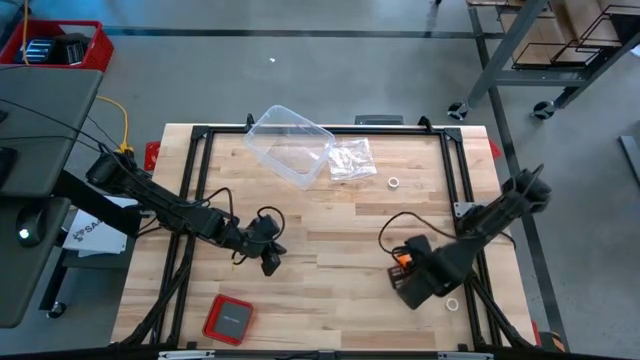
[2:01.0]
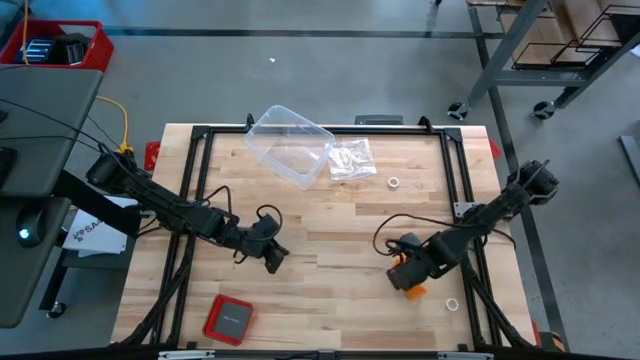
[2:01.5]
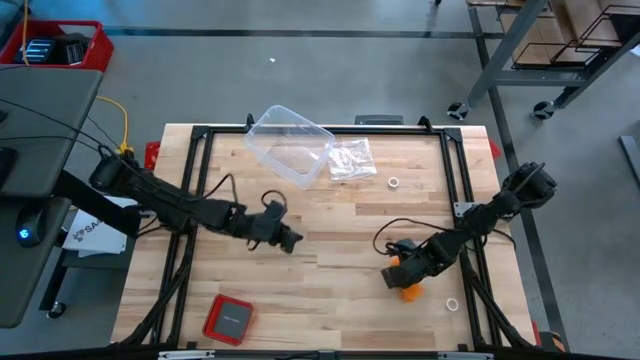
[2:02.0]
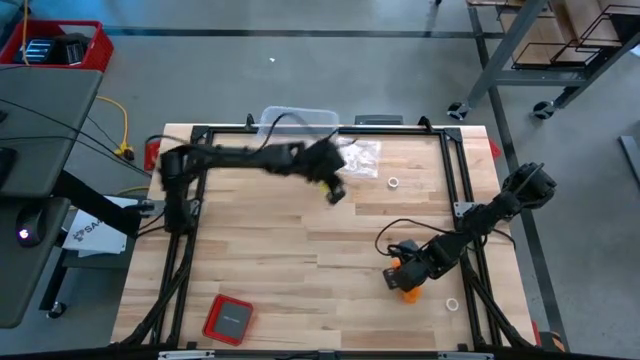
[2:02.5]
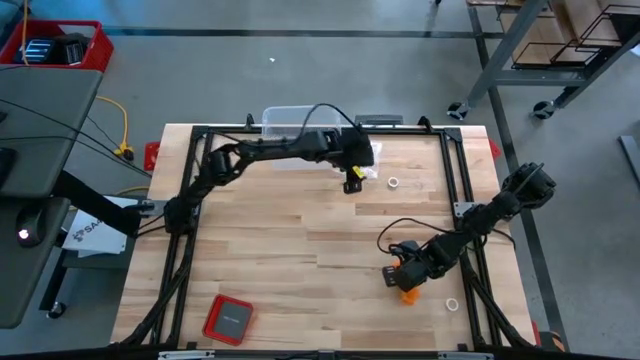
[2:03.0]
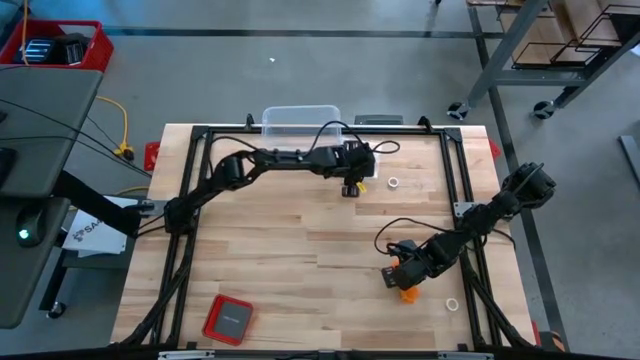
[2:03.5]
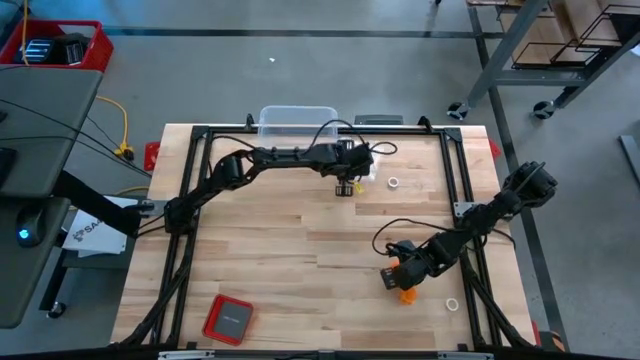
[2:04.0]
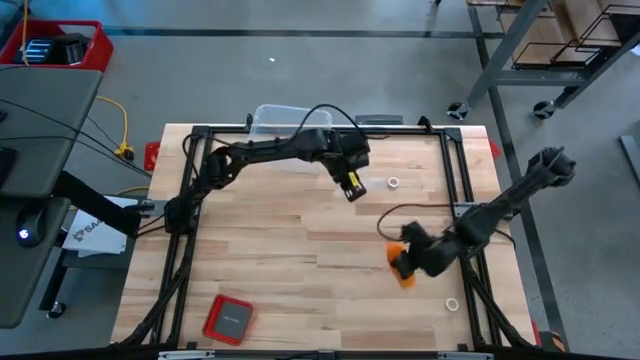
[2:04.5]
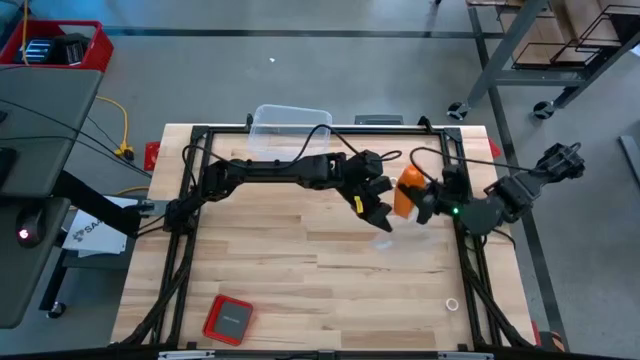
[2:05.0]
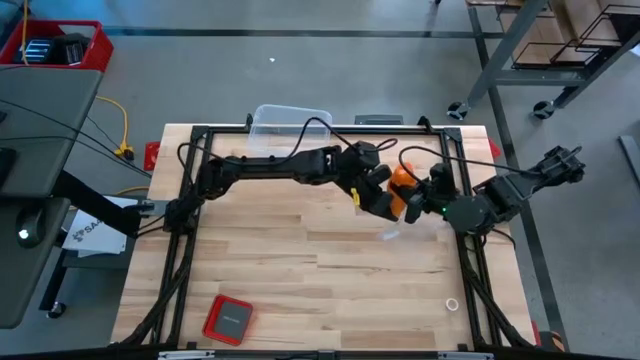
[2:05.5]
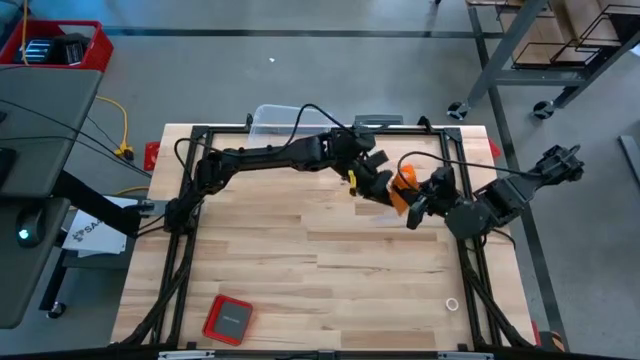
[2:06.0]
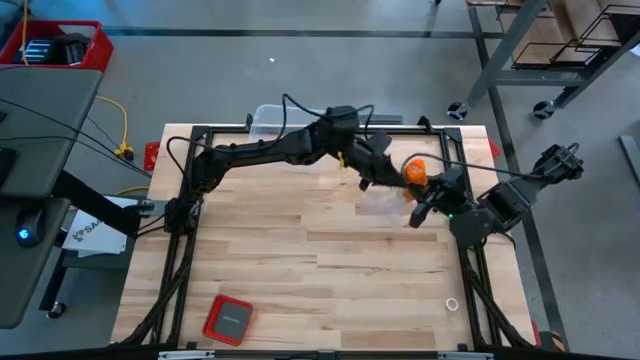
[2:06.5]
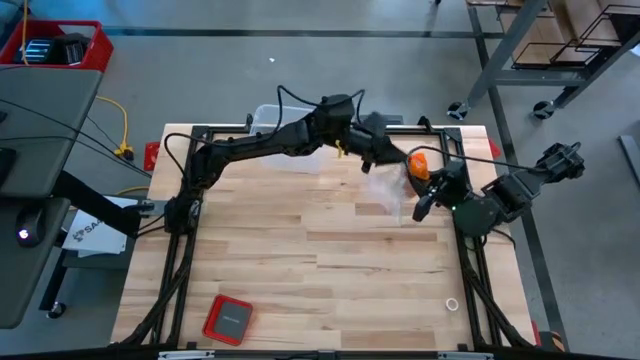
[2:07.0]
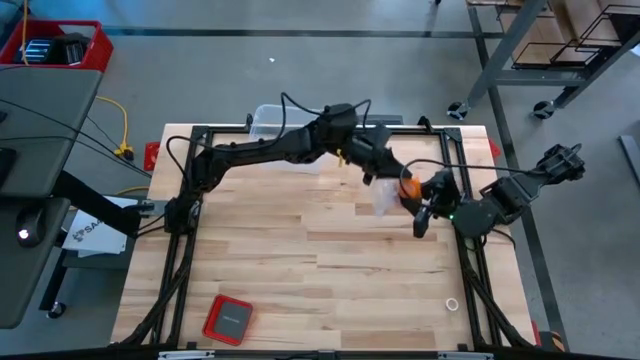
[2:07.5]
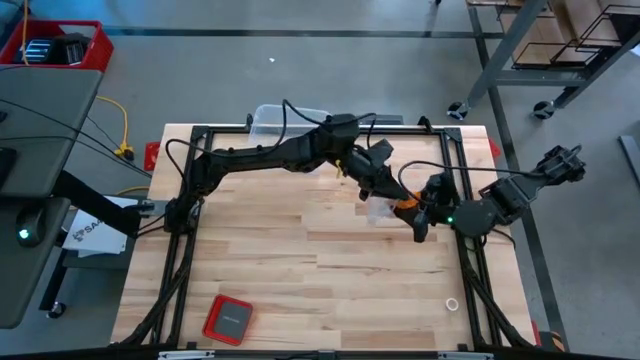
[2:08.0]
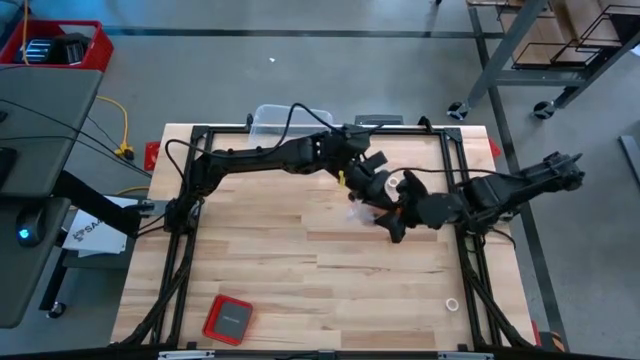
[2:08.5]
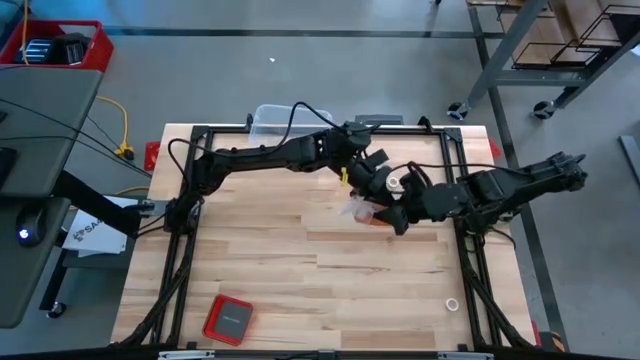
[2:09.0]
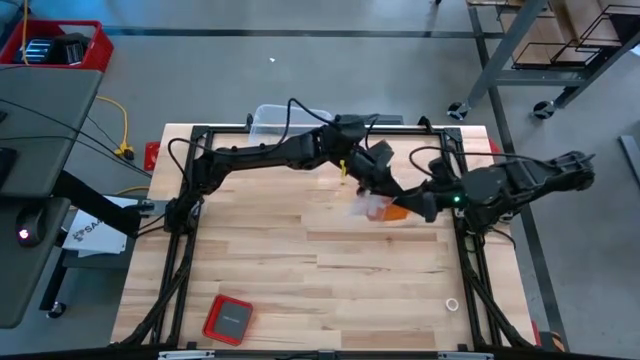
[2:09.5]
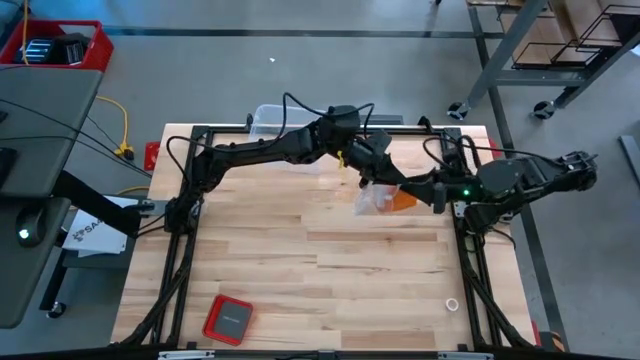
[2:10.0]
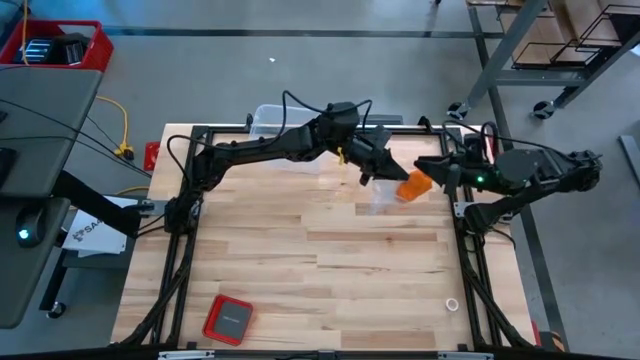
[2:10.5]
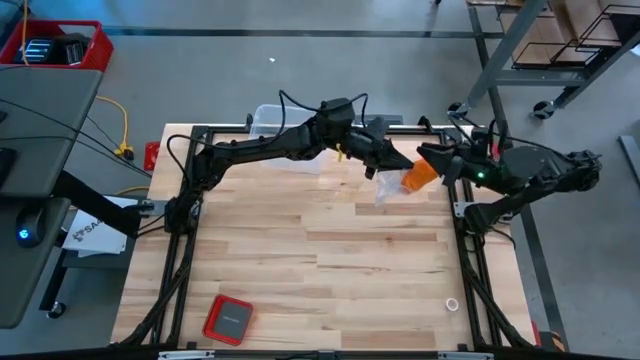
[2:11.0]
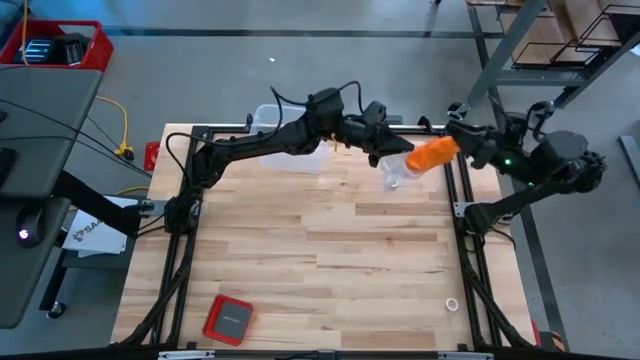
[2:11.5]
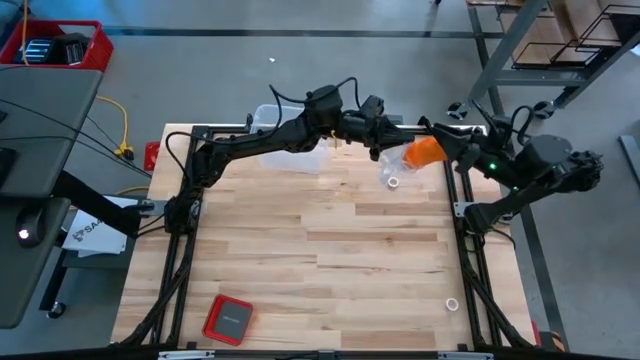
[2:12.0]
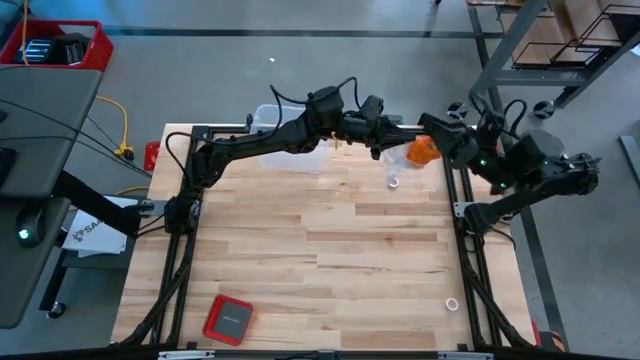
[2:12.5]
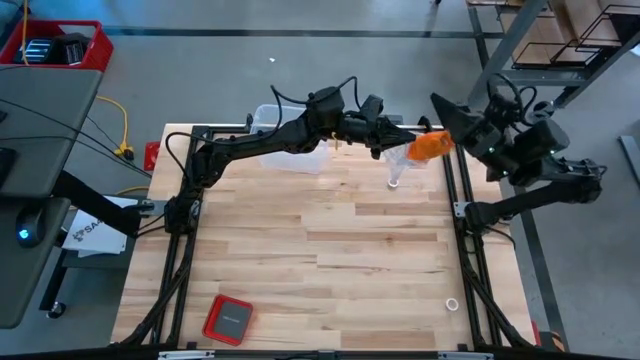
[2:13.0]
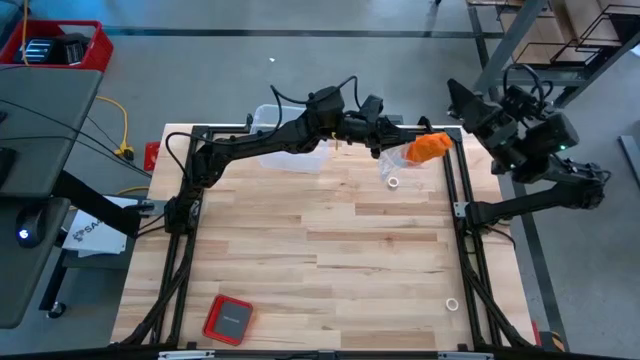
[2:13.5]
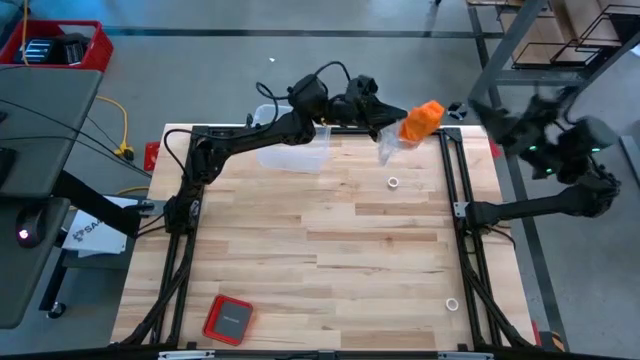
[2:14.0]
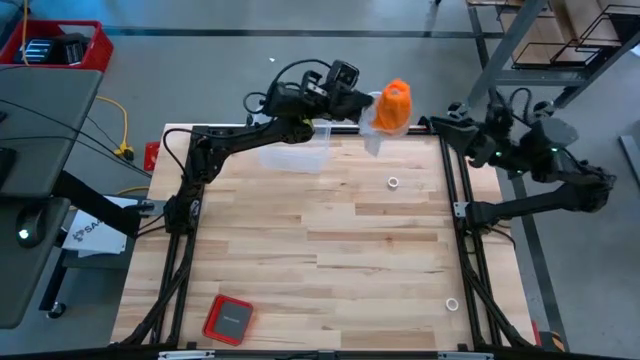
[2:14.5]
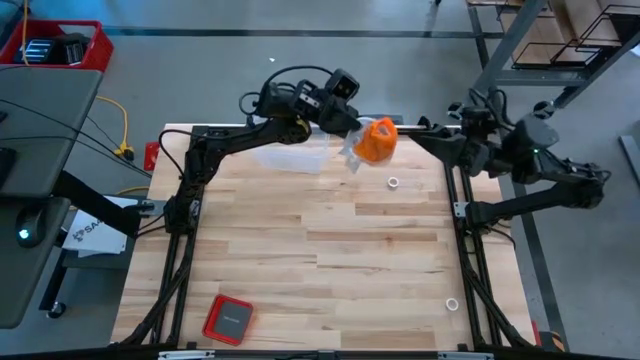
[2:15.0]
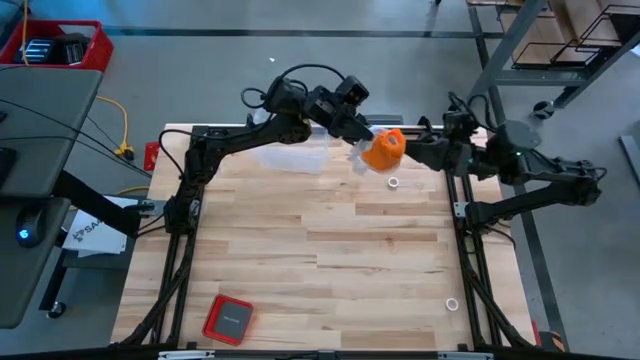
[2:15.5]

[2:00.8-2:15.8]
Task: Roll bandage
Put the orange bandage in the transparent zip bag

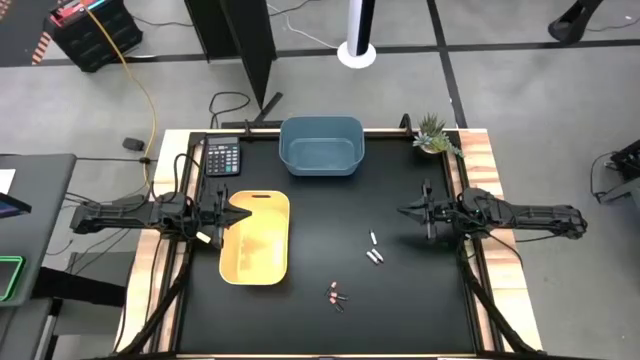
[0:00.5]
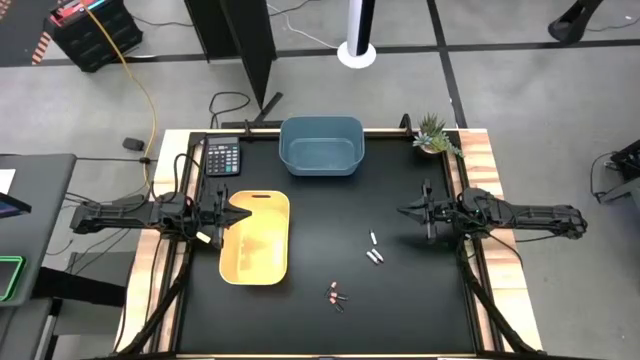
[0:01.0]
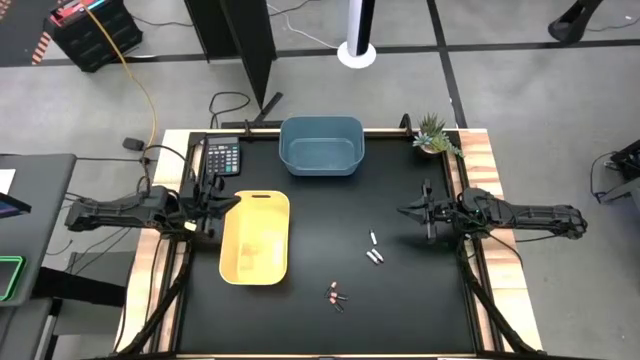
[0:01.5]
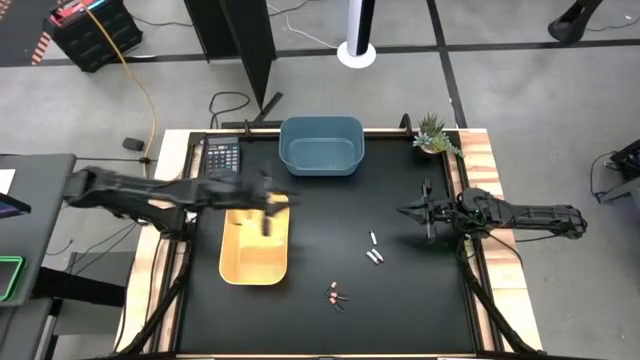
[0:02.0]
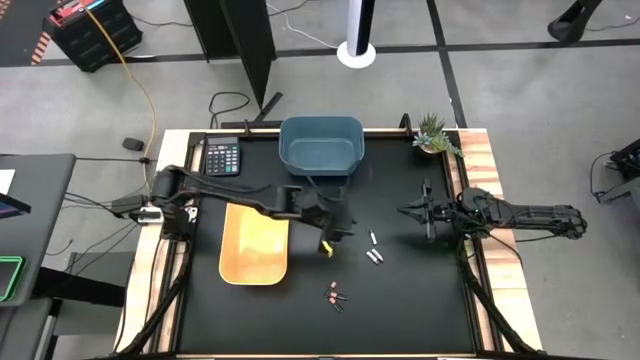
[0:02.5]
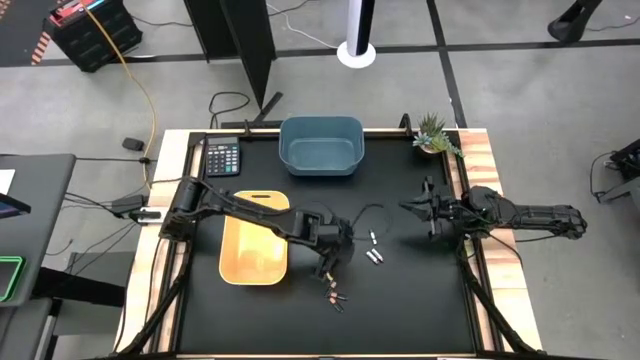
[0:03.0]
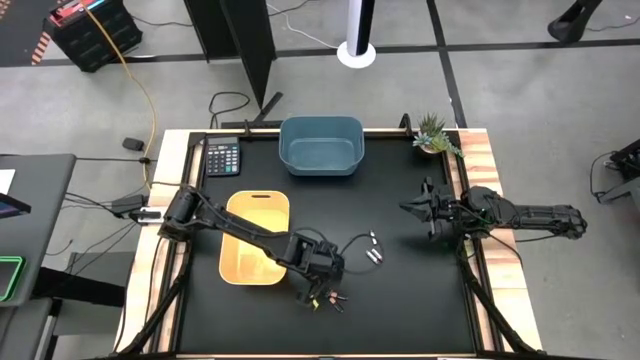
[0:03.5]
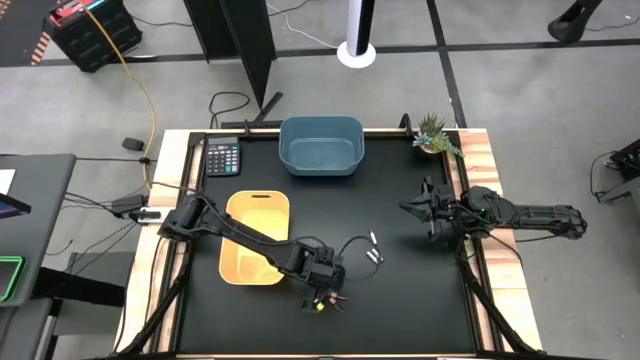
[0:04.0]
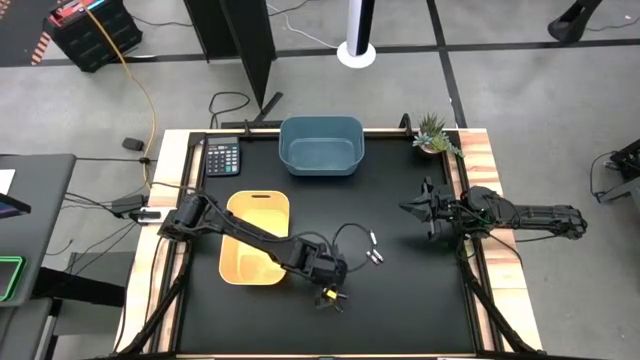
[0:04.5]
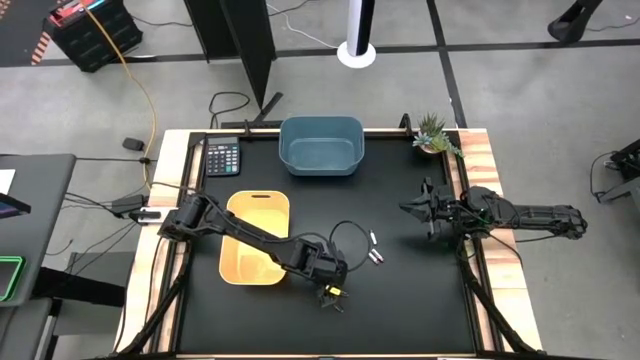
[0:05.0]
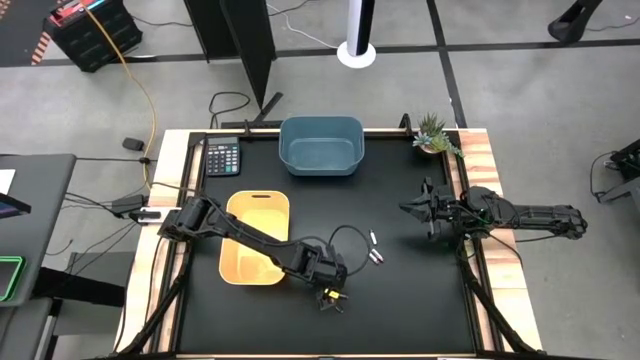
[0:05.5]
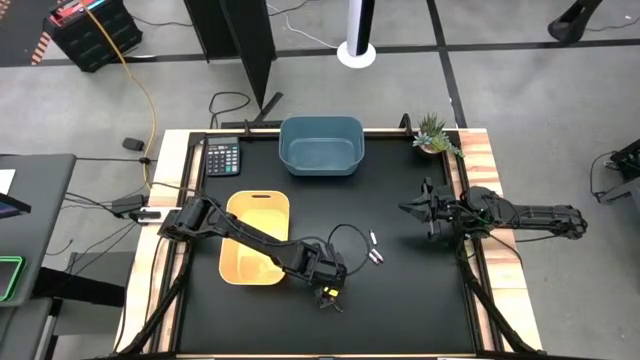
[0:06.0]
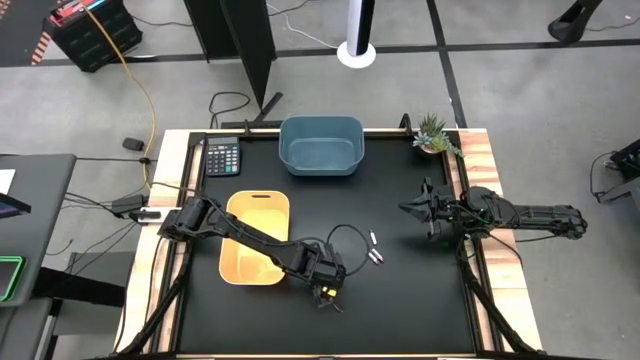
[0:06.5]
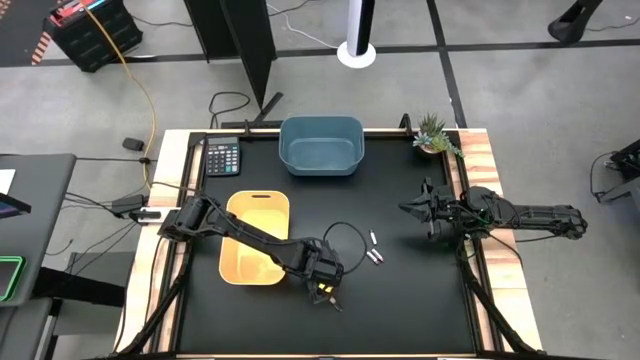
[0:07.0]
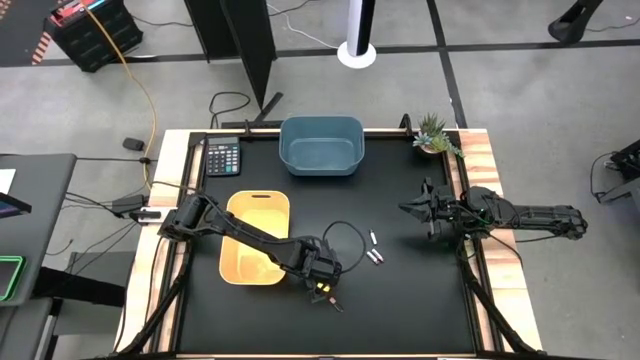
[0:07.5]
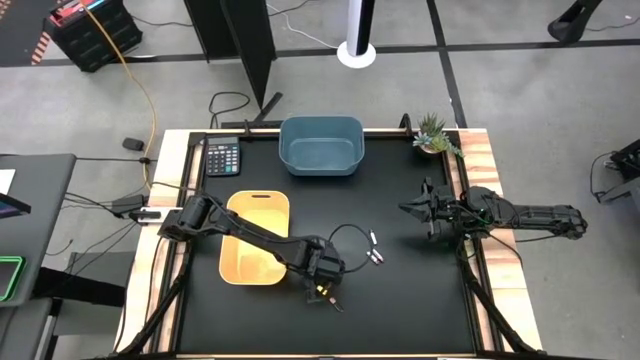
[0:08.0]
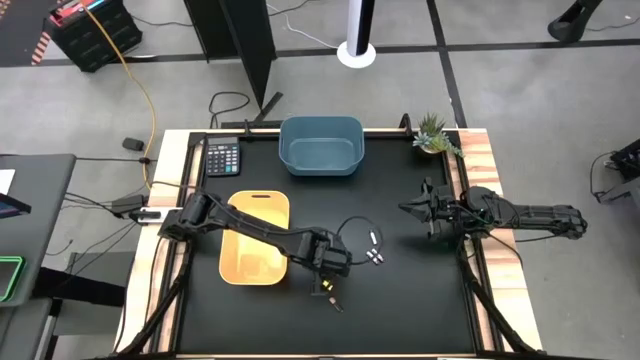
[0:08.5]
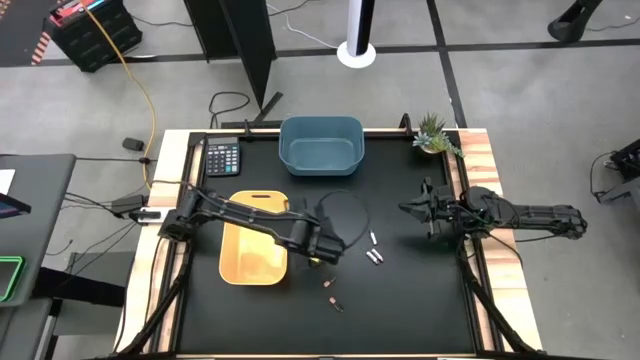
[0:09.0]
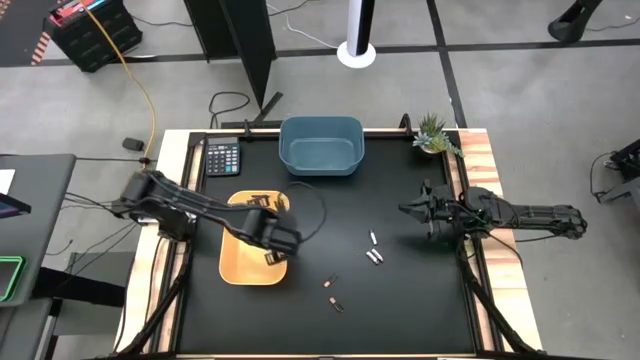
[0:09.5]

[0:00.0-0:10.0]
Task: Sort batteries
Put the top black battery into the orange bin
